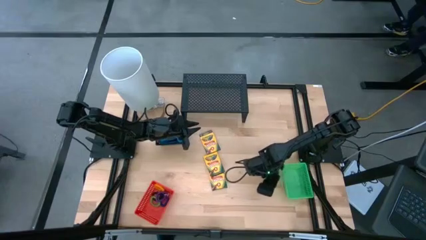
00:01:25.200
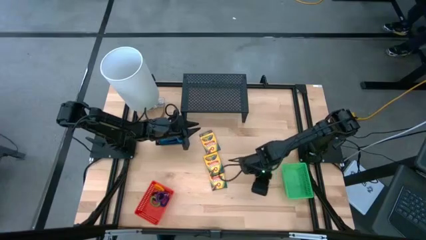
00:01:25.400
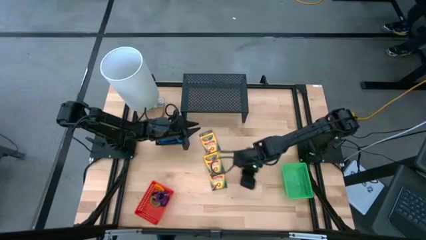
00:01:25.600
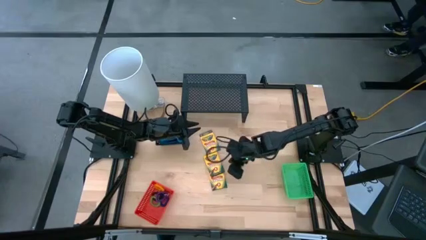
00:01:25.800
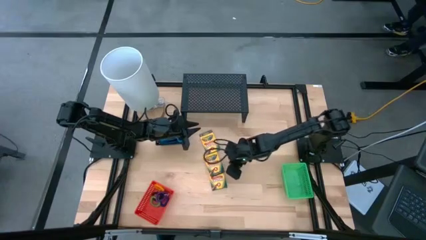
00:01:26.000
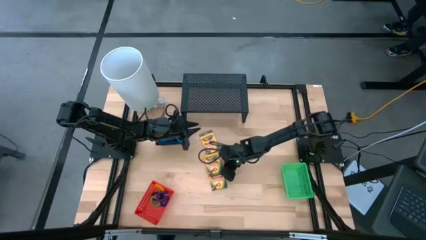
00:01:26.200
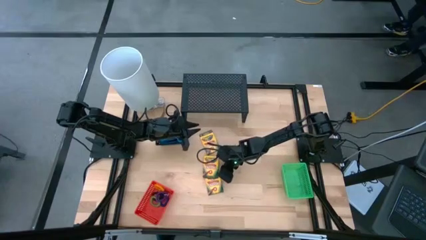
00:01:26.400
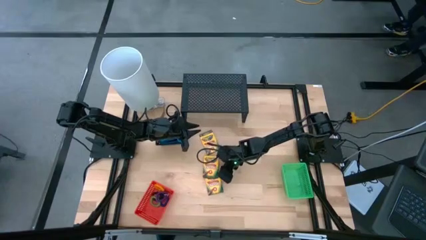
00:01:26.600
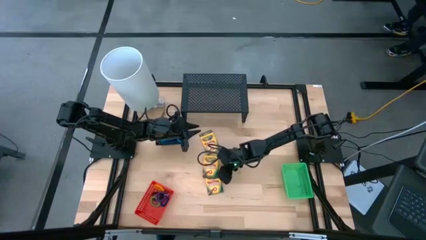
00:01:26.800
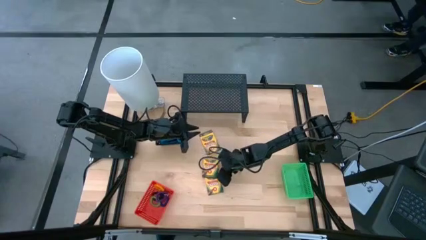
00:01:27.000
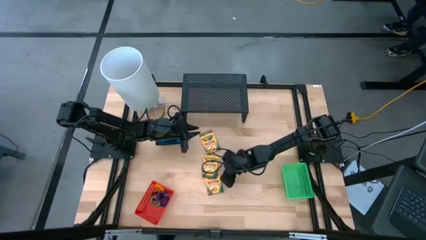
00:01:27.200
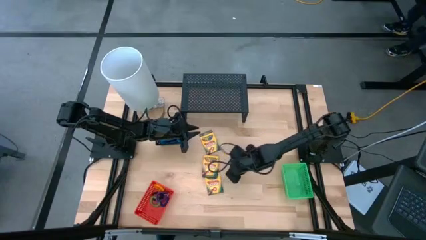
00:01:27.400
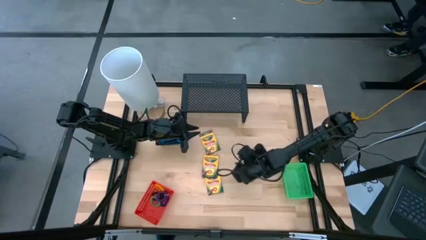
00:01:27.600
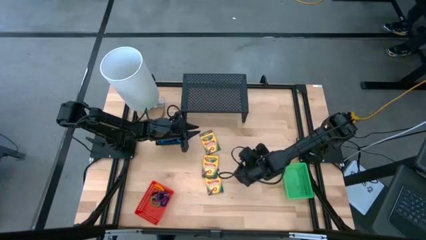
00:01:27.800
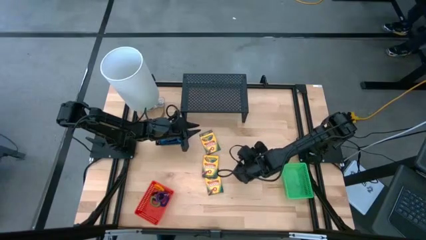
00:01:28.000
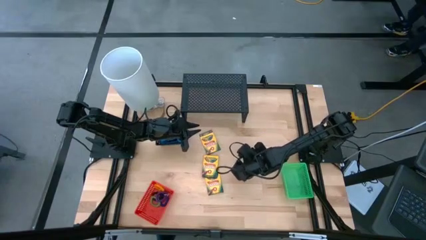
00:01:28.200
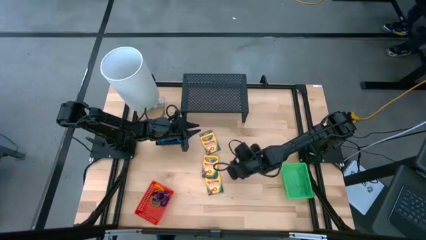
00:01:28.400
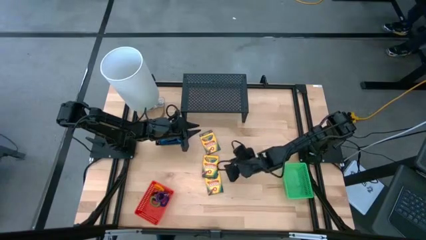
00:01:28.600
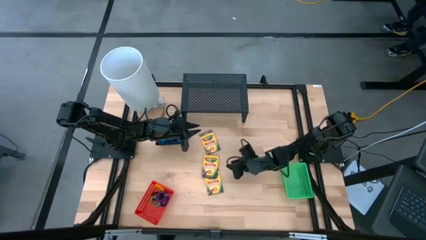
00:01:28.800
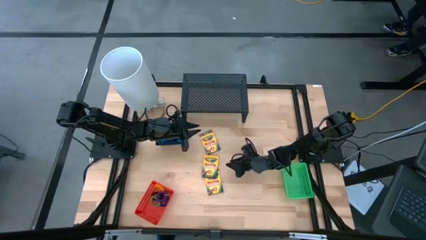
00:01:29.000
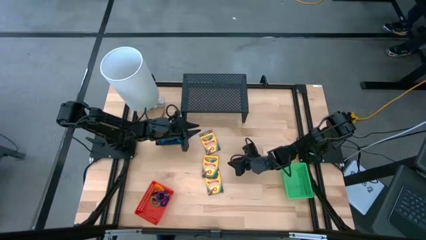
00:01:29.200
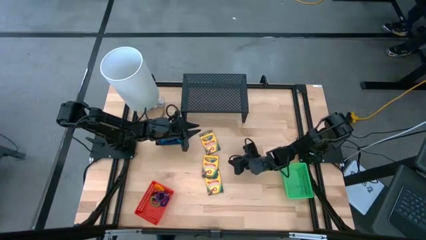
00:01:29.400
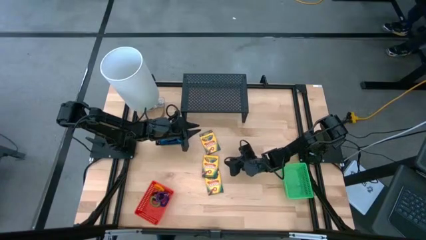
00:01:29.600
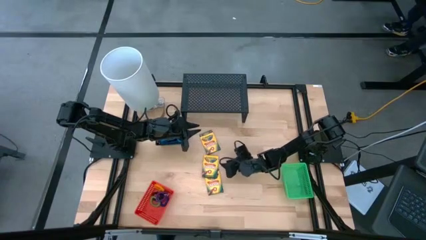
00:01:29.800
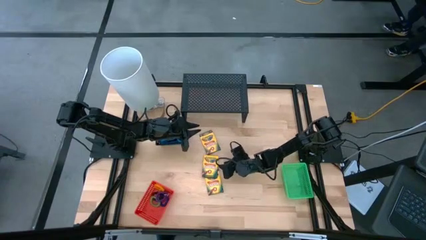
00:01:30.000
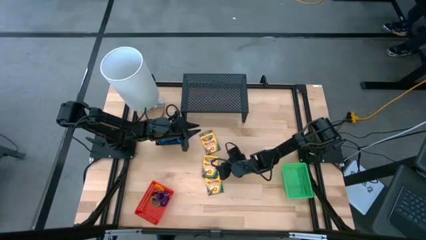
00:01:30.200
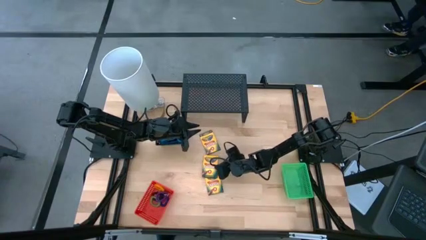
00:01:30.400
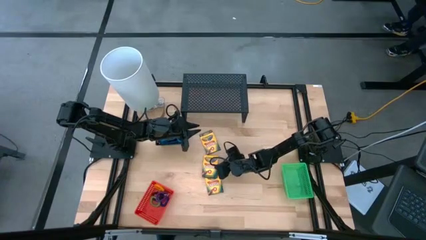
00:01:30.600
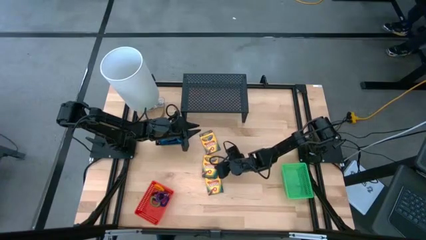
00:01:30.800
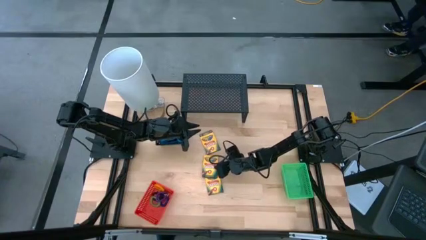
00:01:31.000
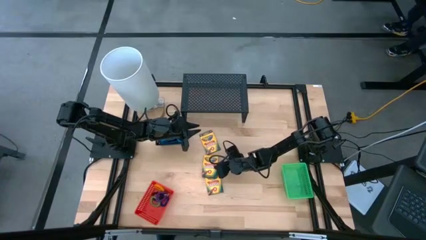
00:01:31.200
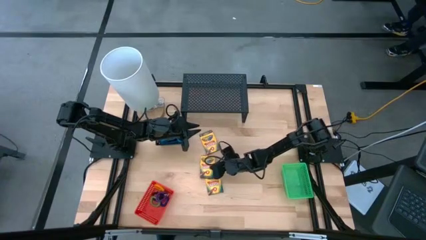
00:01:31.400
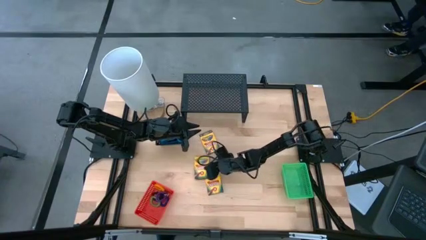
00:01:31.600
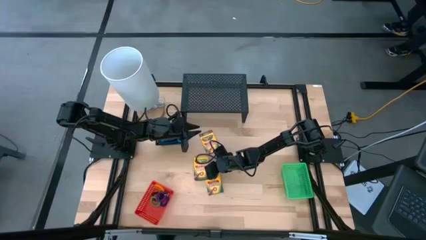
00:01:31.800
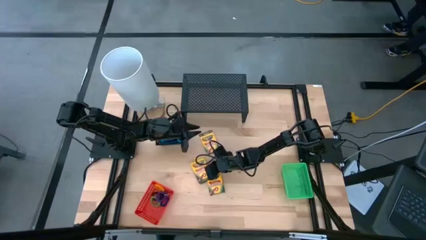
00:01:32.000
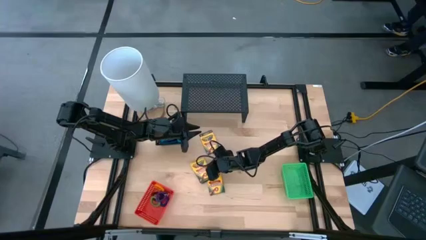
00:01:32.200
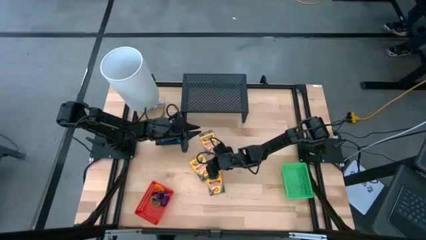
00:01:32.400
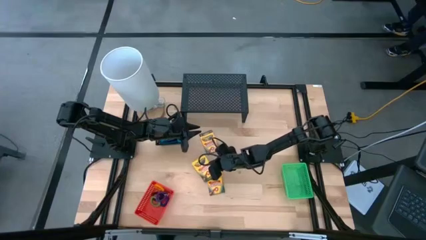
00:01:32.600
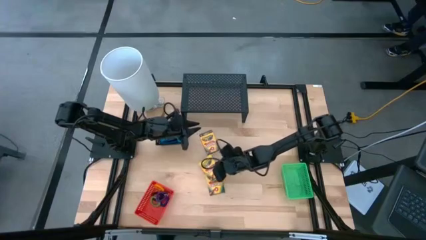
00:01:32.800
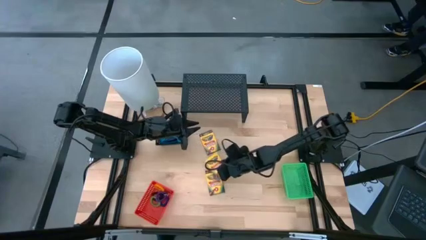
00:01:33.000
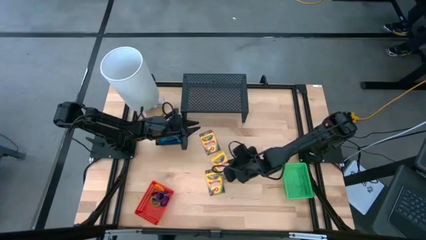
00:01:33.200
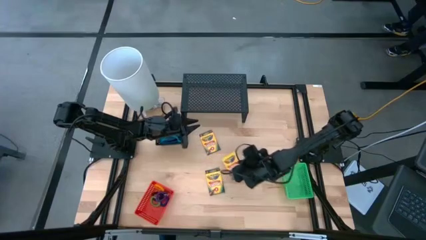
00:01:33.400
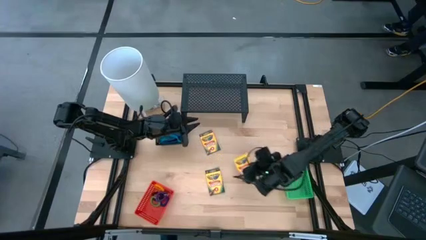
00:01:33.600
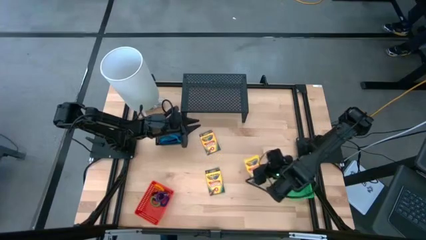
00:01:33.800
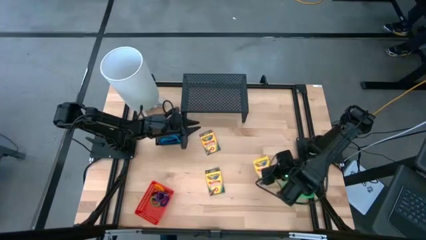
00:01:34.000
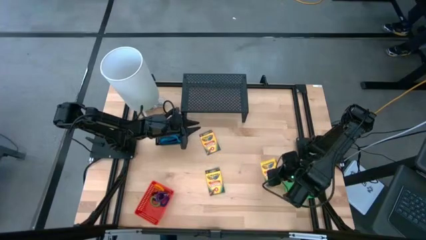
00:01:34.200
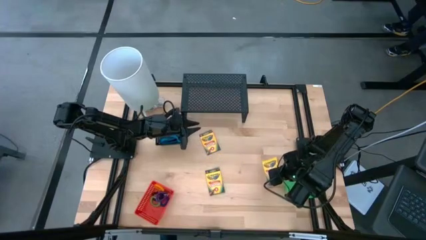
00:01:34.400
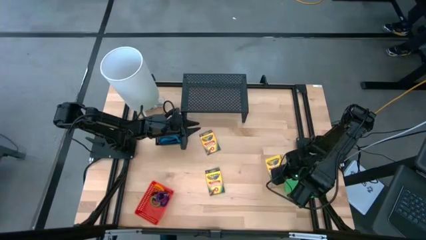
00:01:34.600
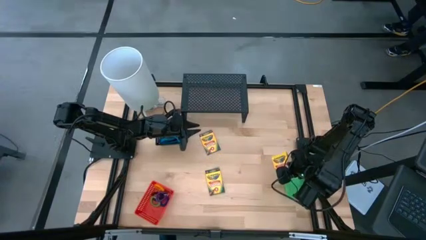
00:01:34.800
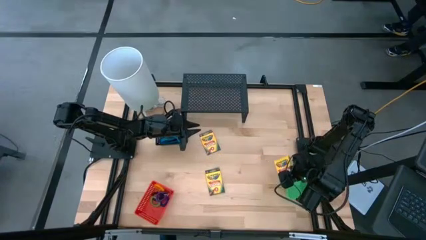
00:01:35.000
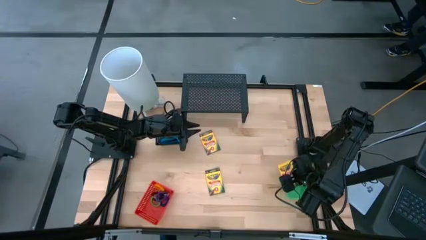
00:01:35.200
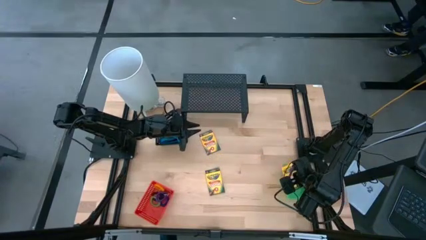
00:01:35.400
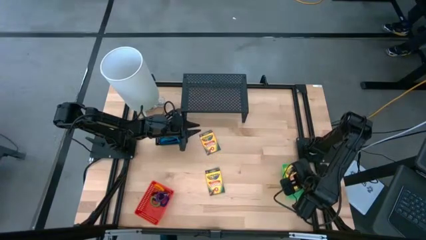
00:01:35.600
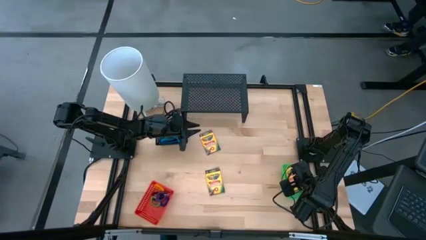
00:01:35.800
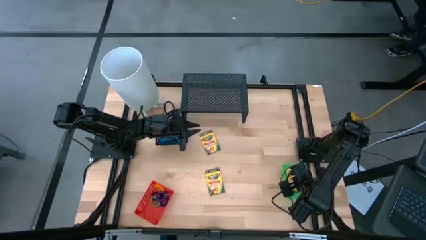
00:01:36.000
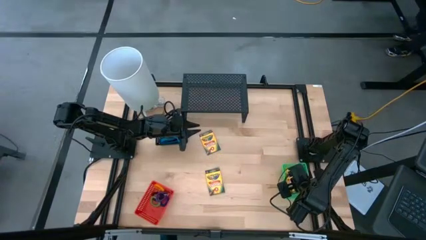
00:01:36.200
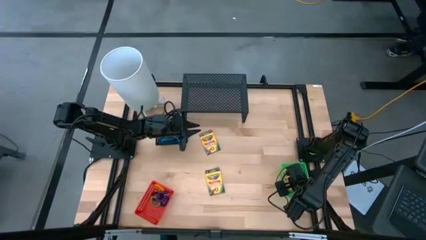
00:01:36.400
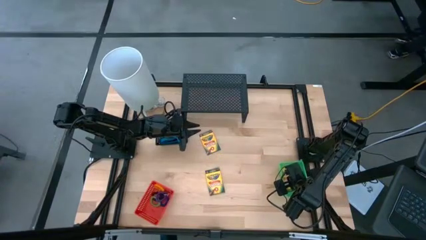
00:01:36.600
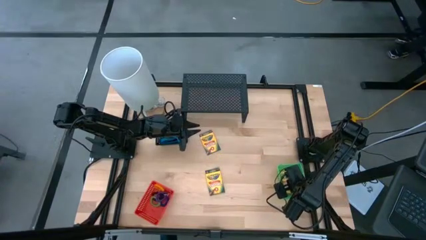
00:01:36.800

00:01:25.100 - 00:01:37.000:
Task: Pick & Place Office Desk Supplies
Put the middle crayon box into the green bin

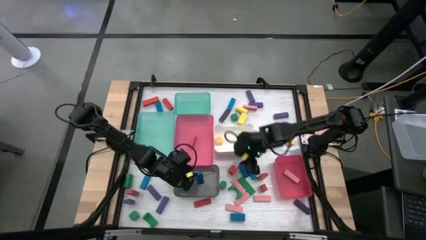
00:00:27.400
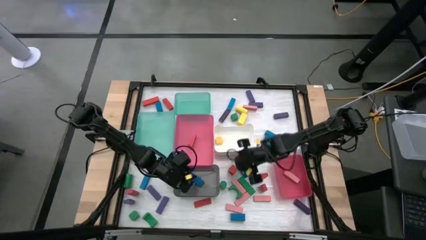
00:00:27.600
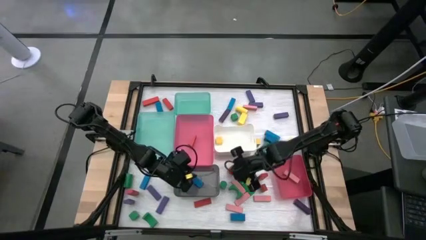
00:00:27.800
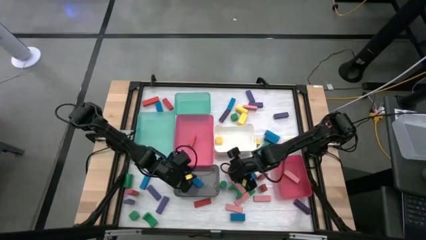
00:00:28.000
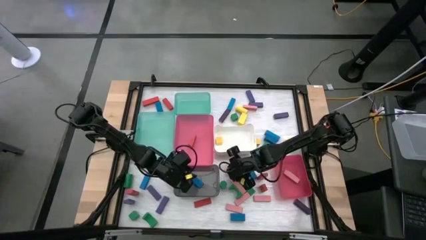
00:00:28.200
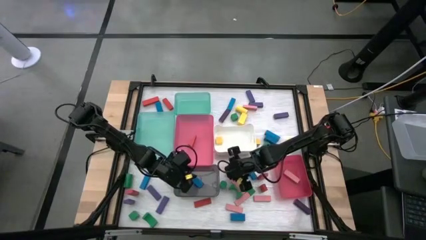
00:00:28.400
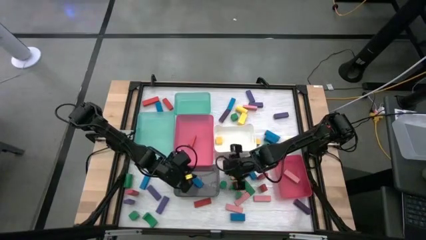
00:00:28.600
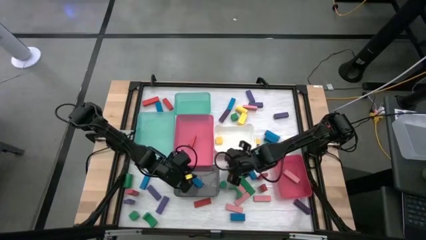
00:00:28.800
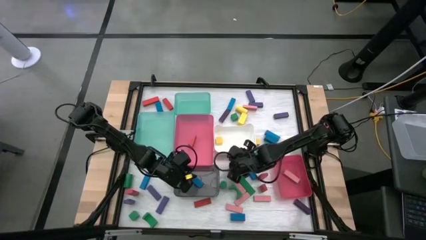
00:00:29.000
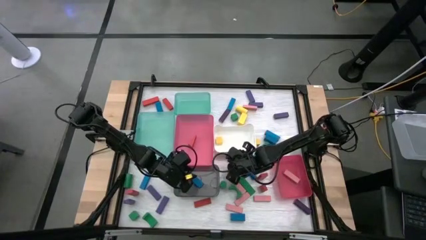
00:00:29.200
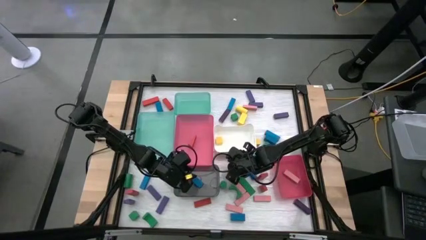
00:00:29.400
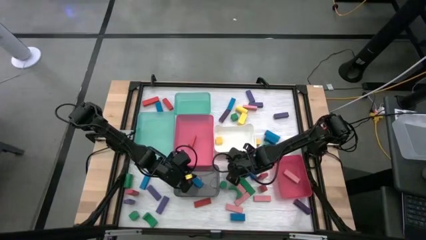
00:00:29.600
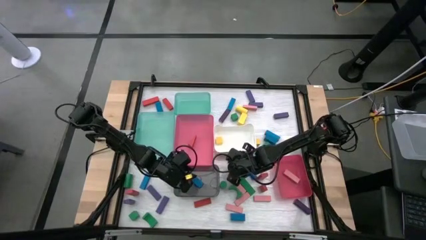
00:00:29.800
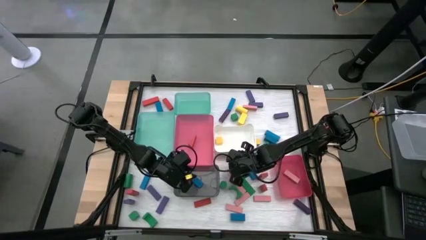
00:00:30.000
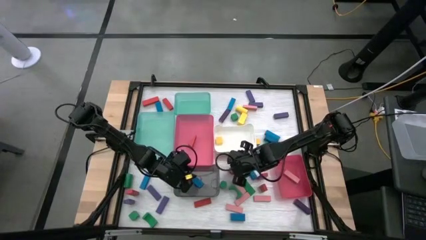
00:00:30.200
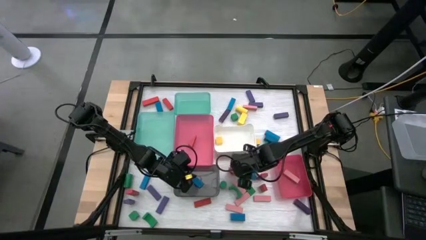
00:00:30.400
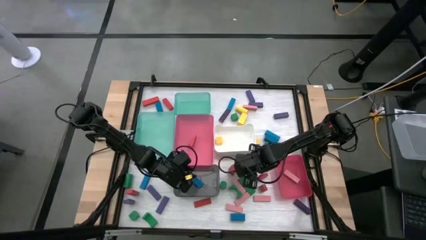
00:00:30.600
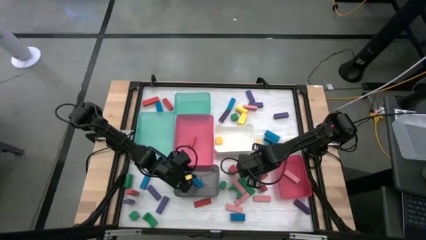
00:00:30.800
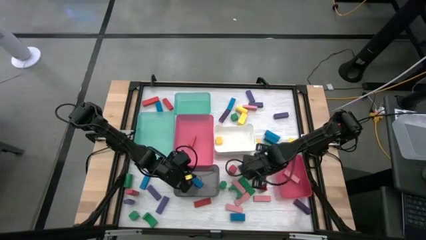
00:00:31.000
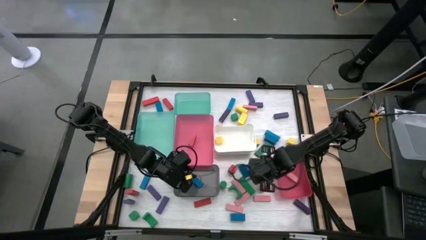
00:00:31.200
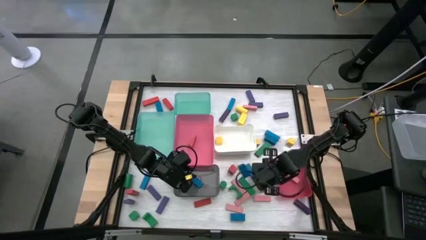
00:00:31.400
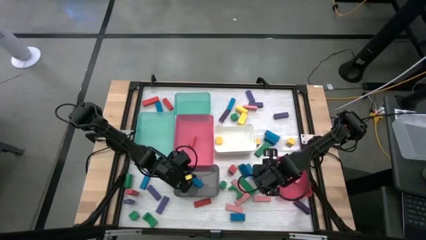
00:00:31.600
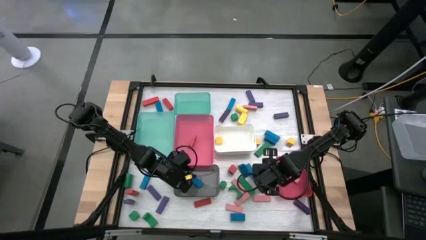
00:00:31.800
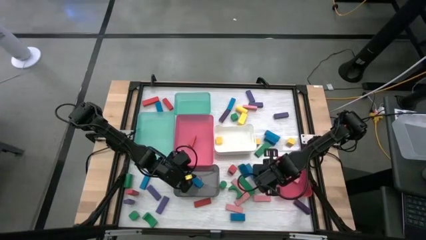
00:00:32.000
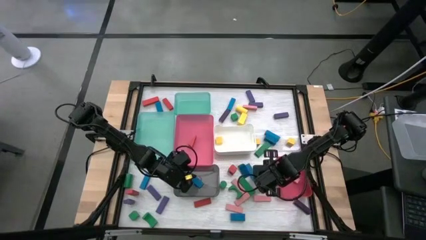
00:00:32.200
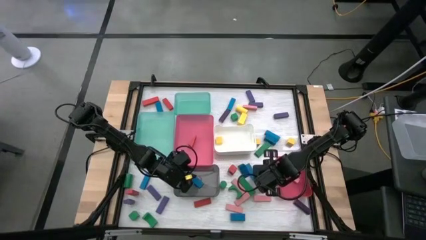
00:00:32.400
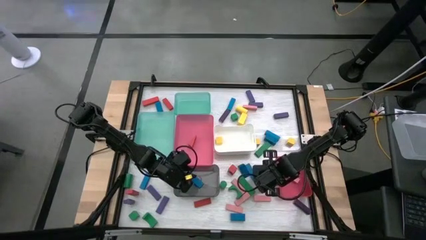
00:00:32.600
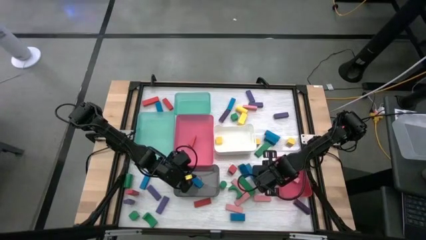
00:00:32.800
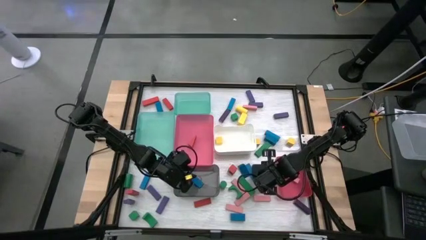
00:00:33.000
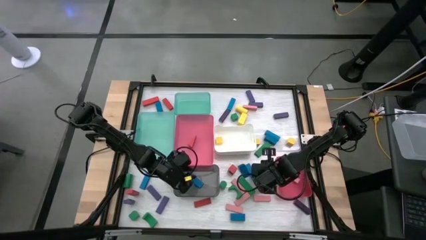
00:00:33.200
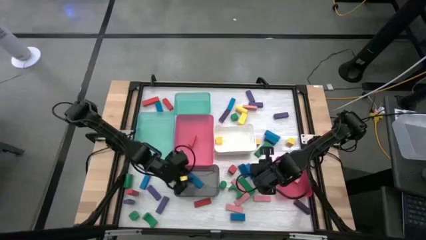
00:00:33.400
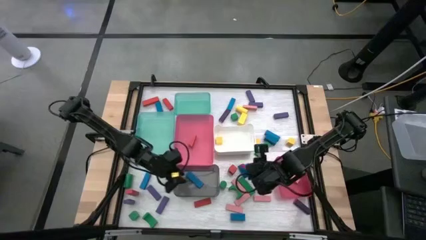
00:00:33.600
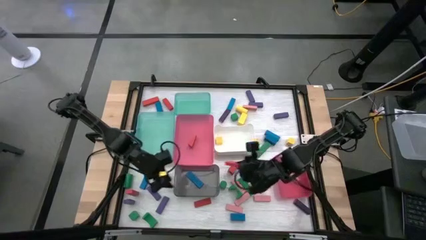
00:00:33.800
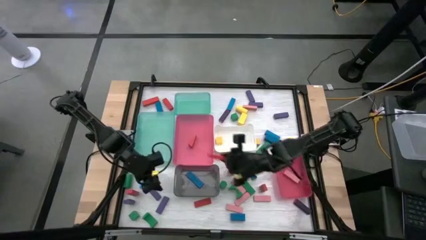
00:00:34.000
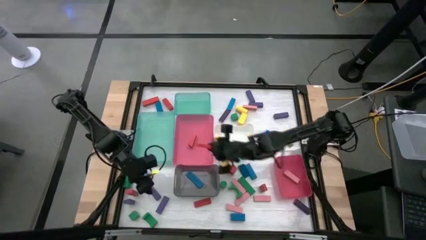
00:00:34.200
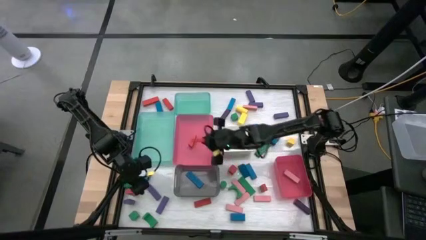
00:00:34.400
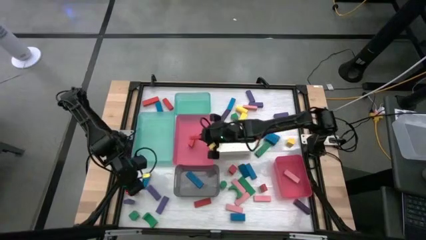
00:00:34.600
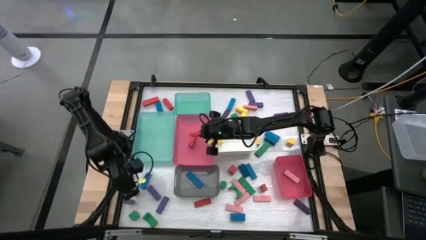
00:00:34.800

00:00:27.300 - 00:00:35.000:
Task: Sort blocks
Put the red block into the top pink bin
